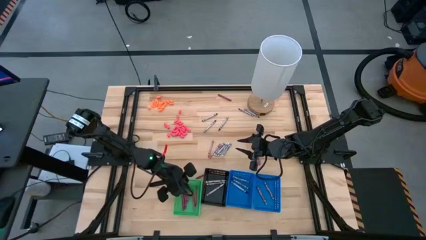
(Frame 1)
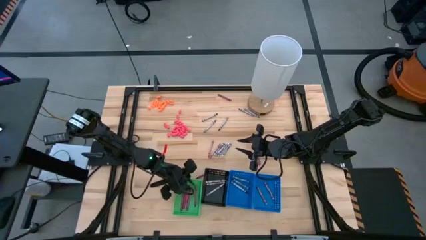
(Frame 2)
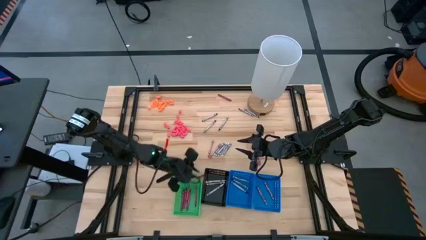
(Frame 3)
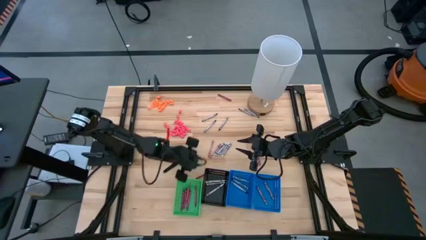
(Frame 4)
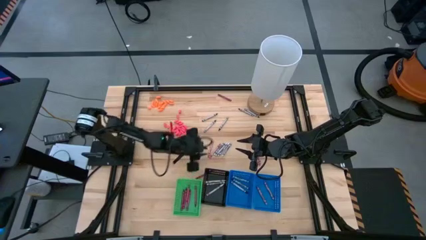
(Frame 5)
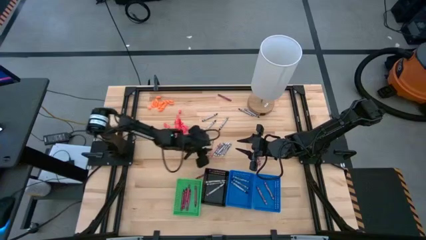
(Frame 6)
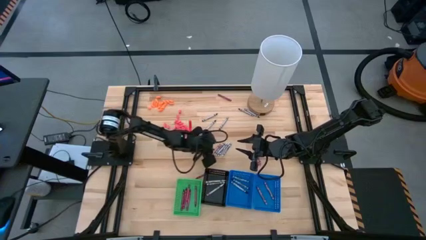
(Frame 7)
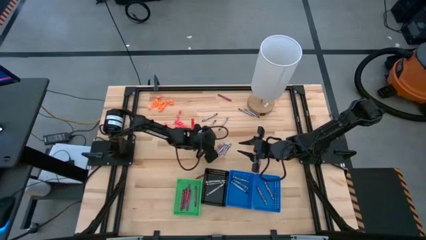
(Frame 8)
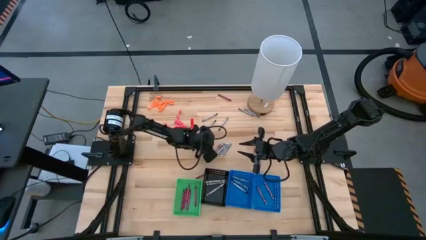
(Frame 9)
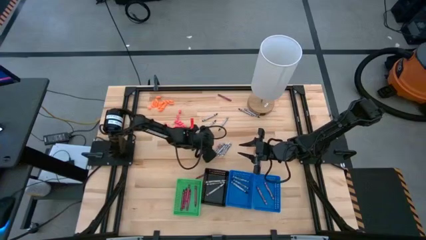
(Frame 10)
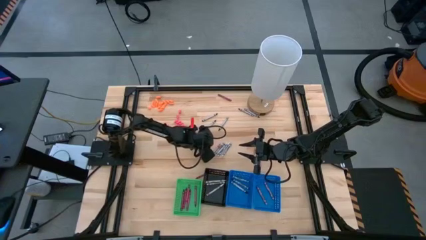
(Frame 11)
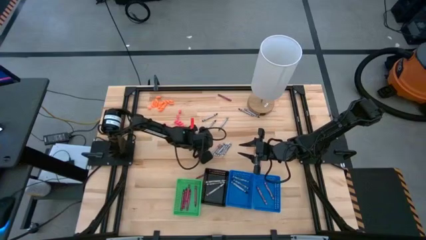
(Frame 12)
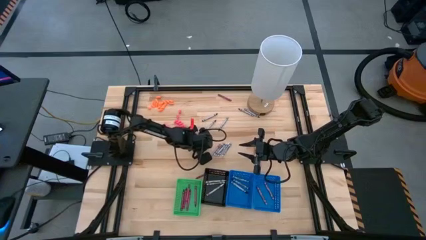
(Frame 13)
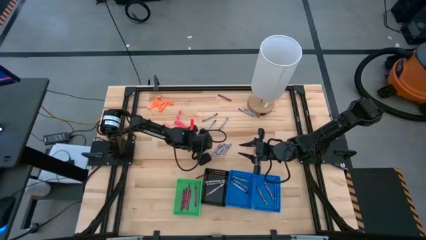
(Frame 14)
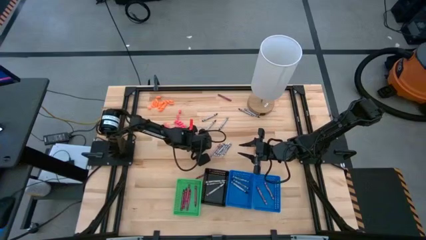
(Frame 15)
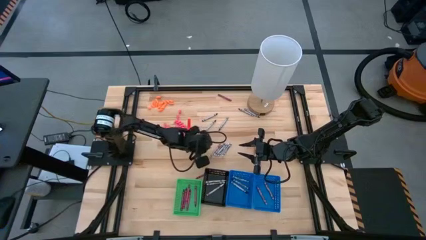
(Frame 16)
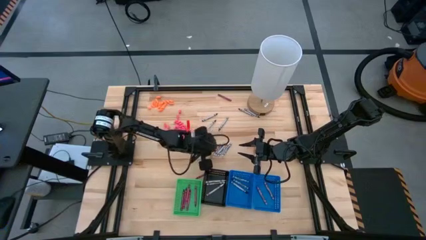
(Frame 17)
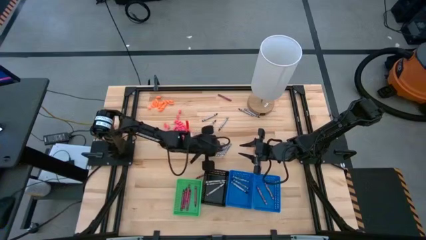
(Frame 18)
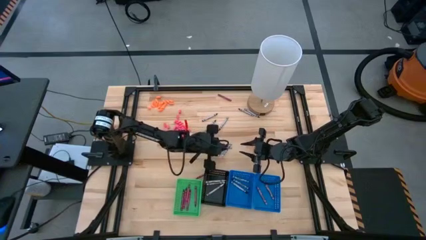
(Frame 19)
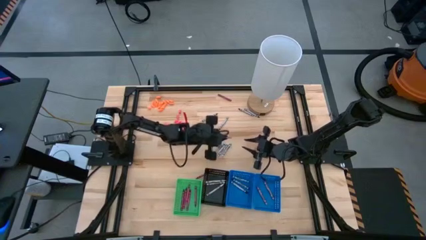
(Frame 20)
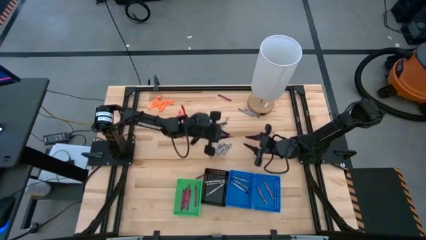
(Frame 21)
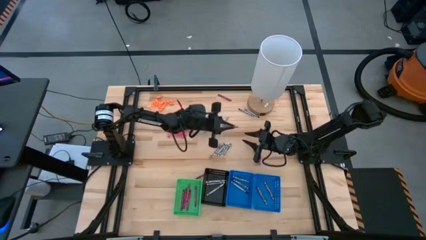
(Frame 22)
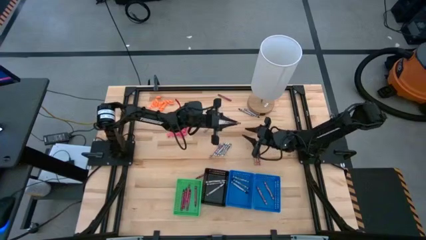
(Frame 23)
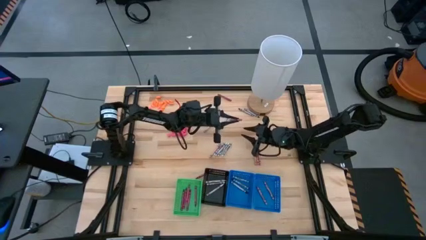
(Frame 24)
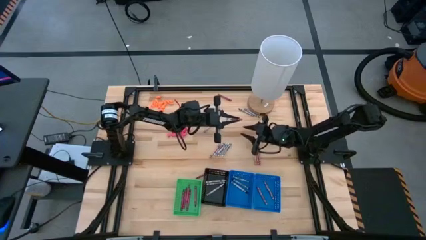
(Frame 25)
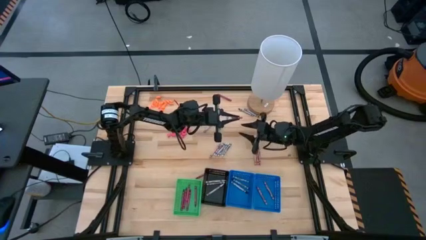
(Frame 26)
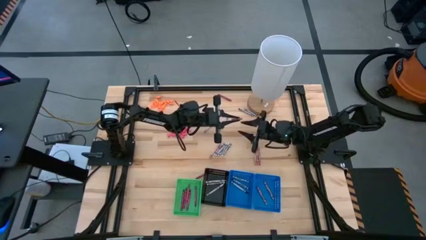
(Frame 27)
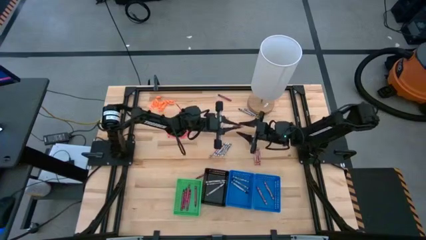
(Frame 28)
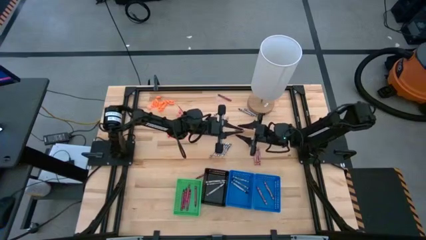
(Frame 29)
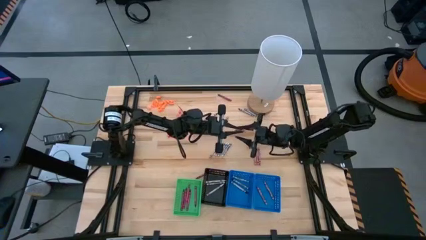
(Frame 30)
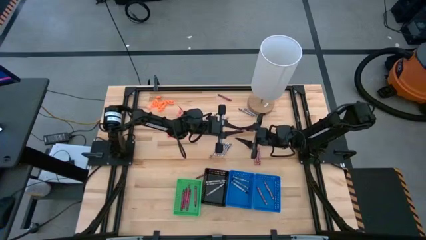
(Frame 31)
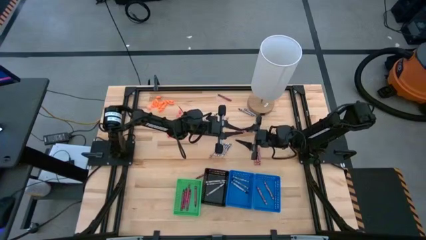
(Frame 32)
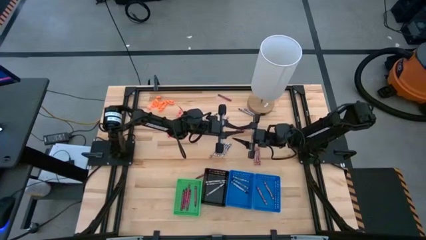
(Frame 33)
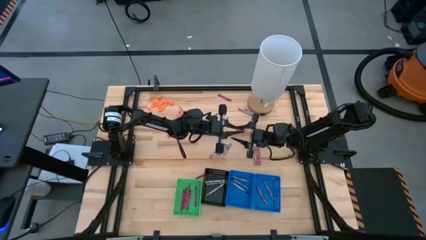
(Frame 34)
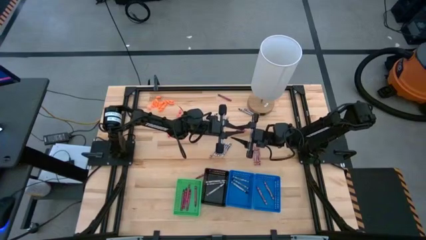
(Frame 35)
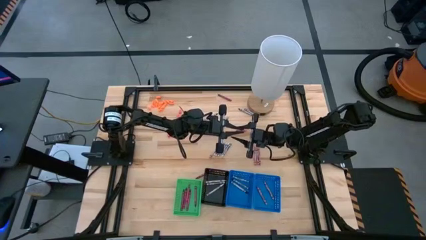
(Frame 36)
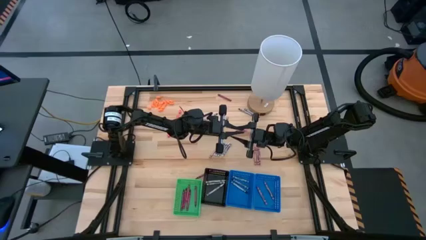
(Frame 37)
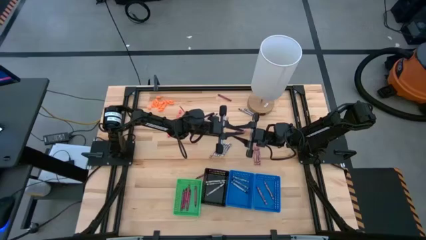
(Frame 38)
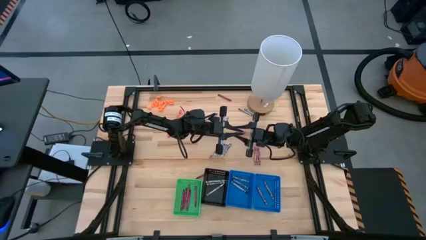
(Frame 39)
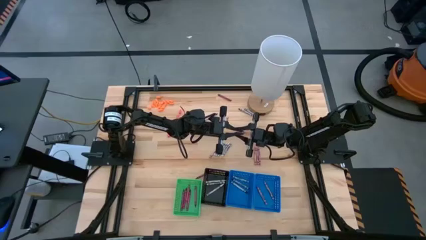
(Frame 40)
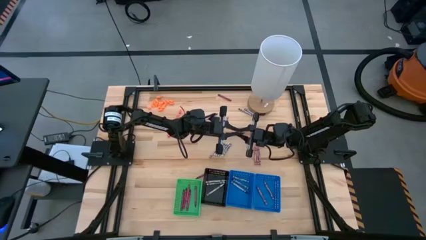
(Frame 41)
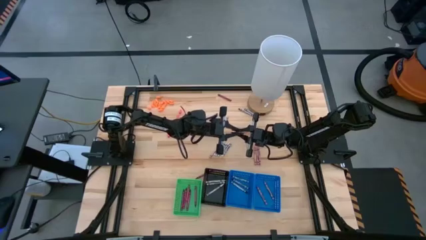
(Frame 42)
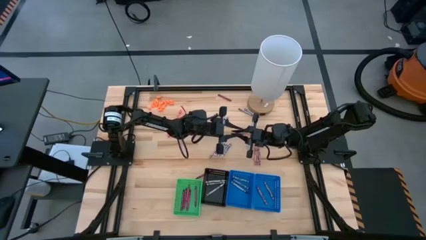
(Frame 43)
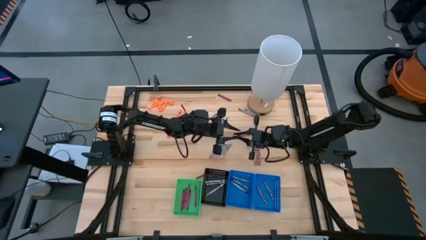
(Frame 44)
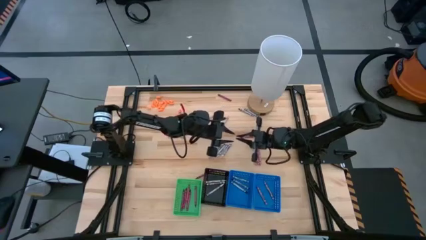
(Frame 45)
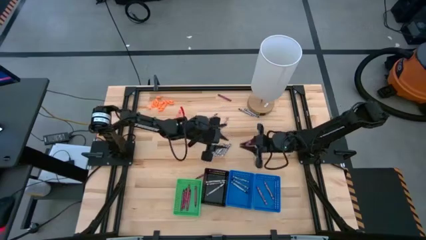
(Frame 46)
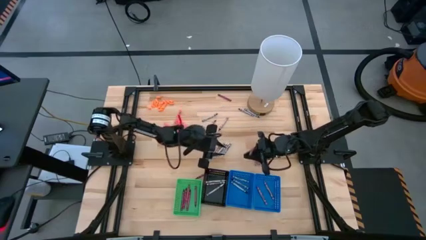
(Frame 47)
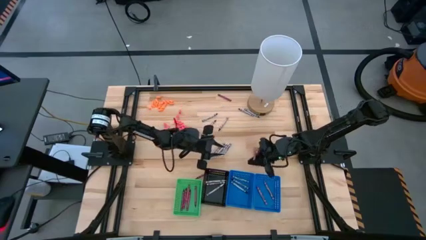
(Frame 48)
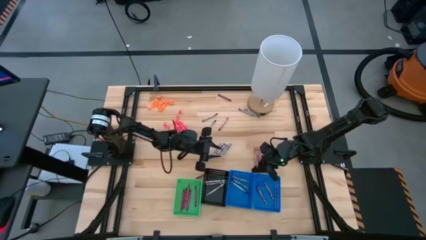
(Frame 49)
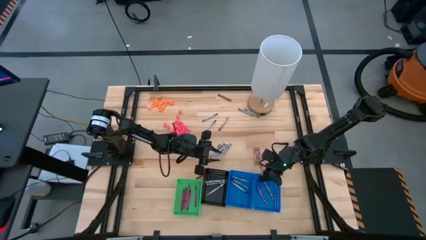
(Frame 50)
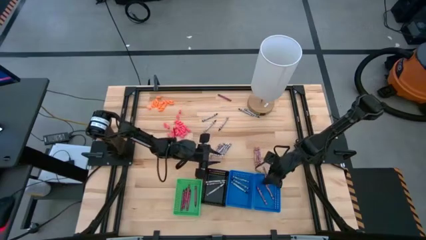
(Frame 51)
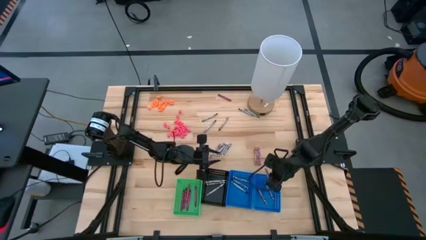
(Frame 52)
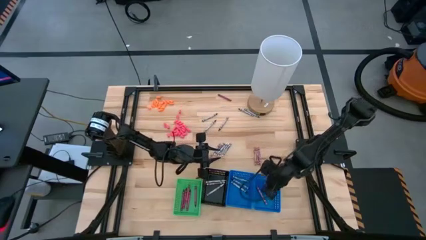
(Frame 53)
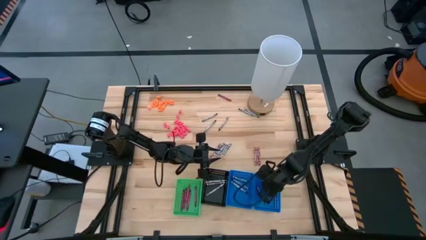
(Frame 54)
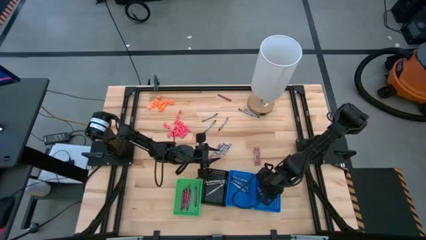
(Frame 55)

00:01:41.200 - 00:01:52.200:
Task: Sort crayons
Put the pink crayon into the right blue bin

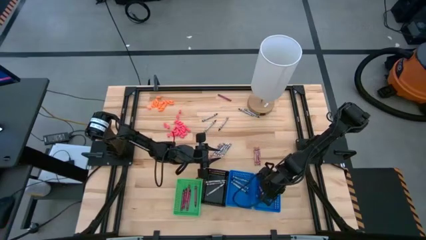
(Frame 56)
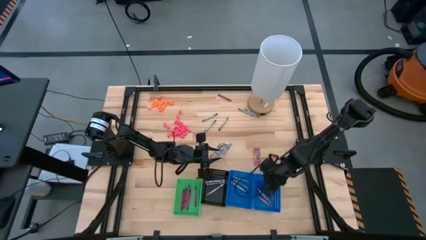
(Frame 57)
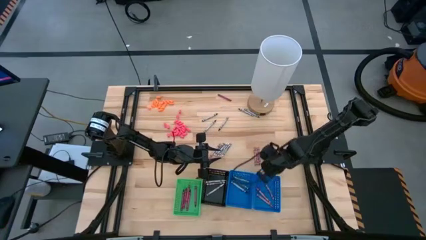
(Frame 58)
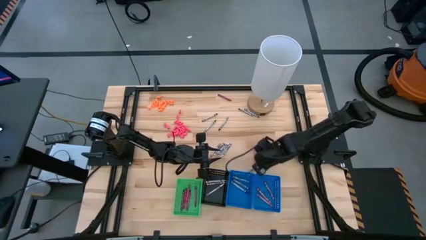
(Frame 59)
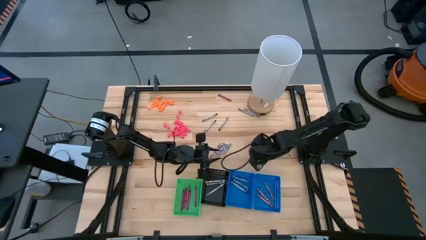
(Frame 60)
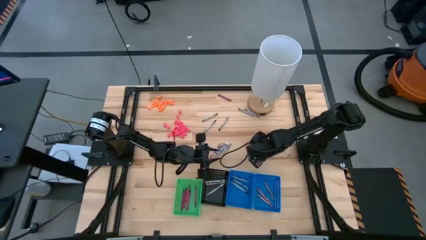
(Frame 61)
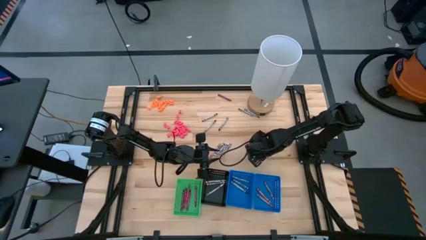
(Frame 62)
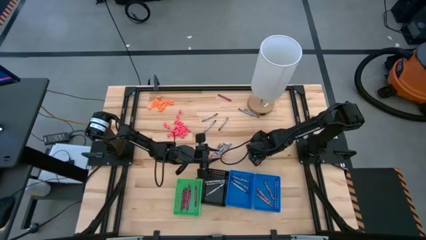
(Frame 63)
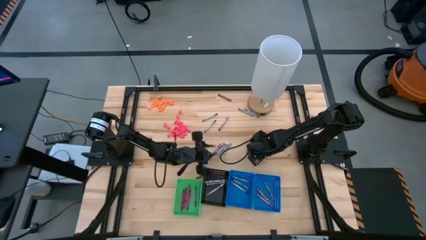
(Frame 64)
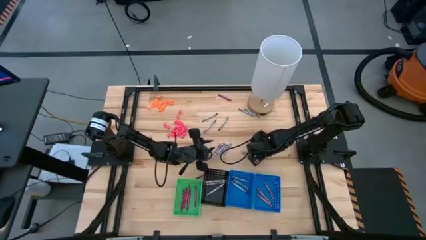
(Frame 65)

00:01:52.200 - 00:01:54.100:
Put the pink crayon into the right blue bin

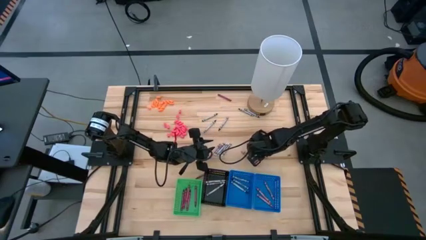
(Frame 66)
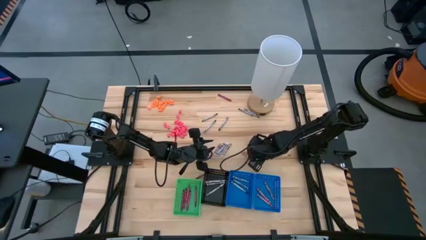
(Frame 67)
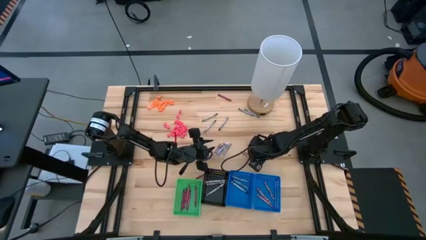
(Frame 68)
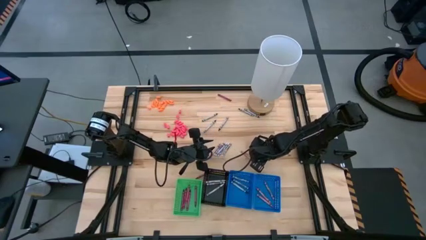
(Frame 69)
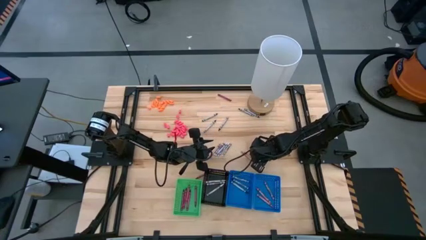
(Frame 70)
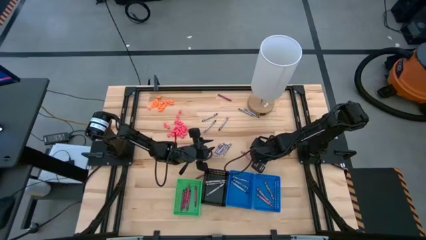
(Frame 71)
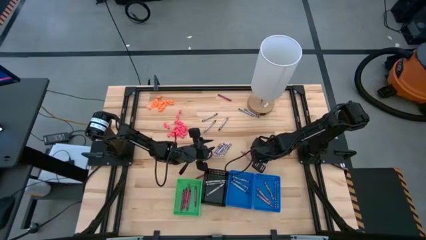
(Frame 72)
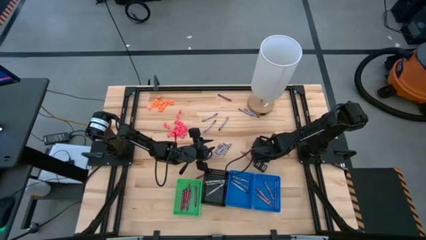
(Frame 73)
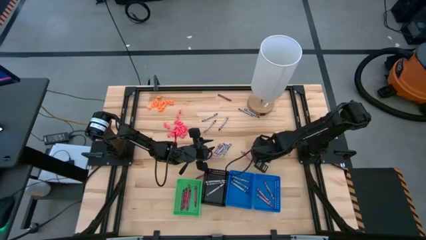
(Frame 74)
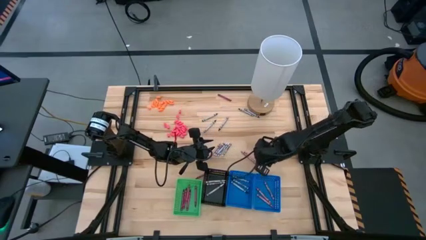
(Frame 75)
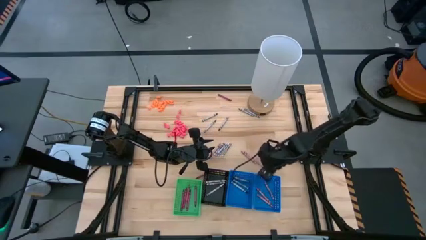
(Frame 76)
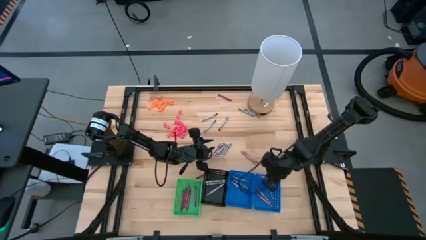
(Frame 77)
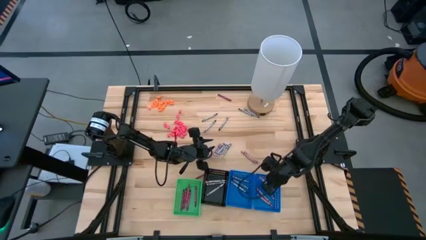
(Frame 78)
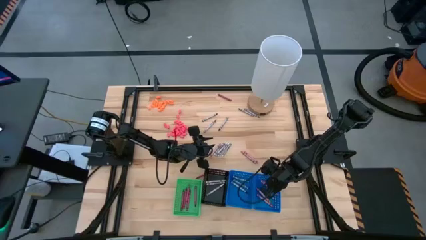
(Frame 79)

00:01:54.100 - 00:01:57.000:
Put the pink crayon into the right blue bin
